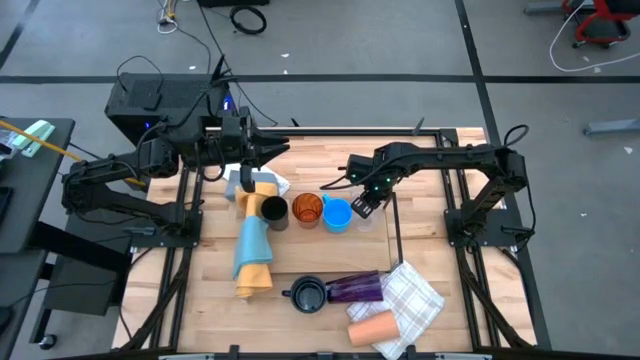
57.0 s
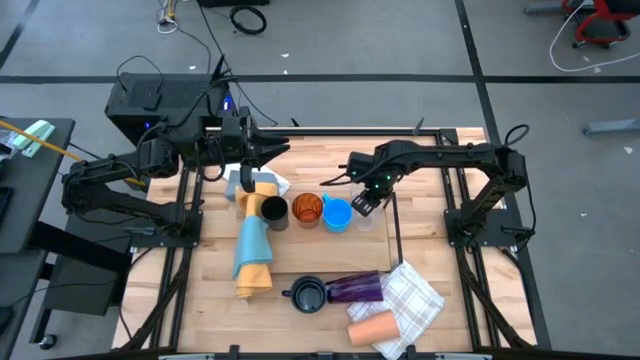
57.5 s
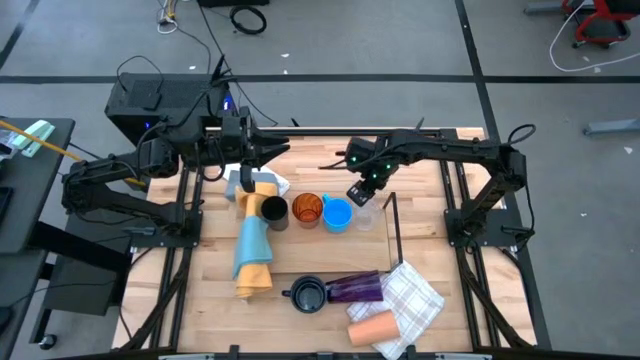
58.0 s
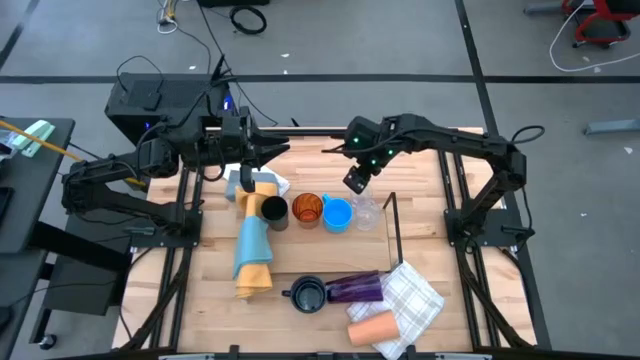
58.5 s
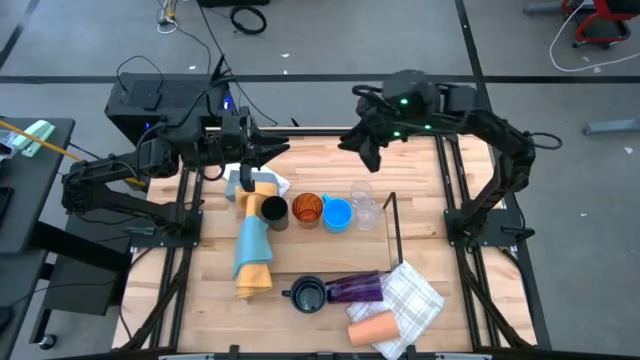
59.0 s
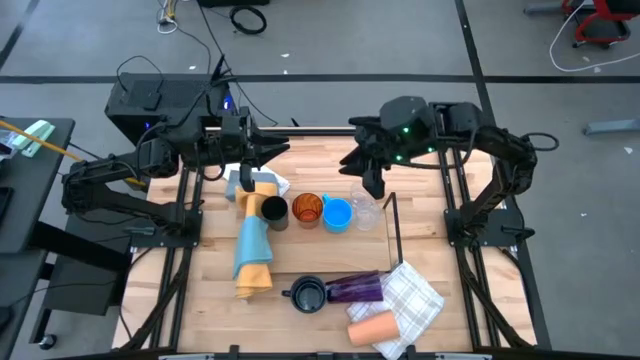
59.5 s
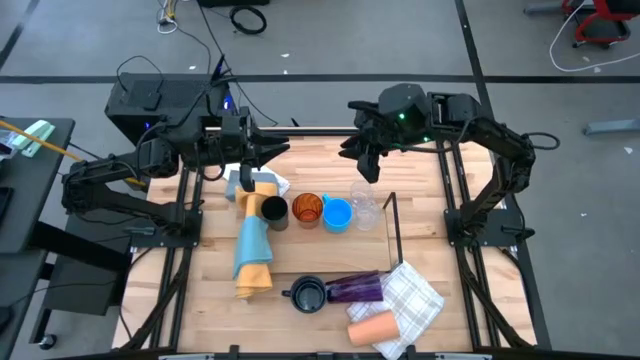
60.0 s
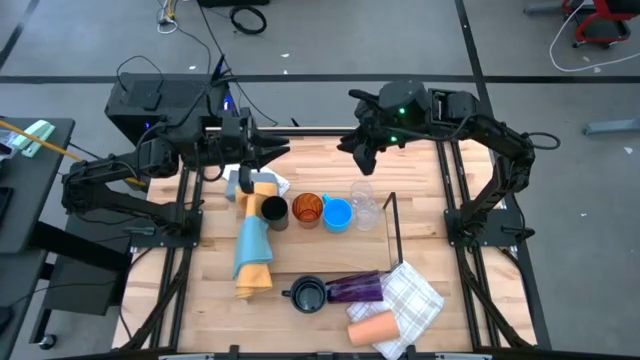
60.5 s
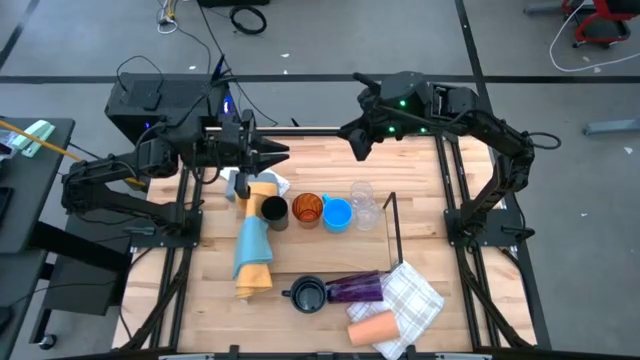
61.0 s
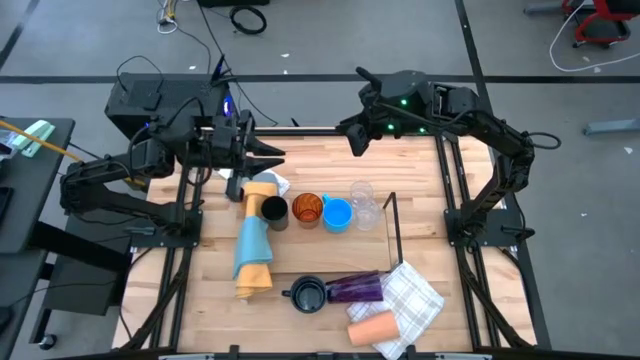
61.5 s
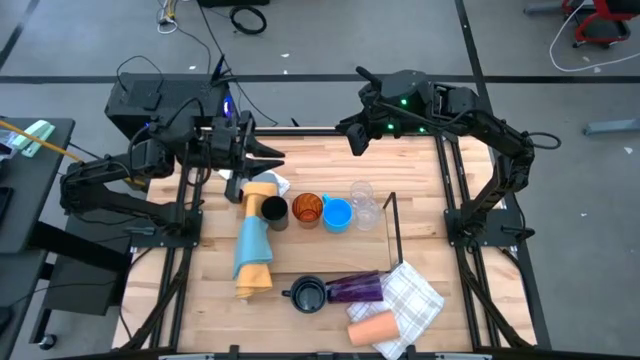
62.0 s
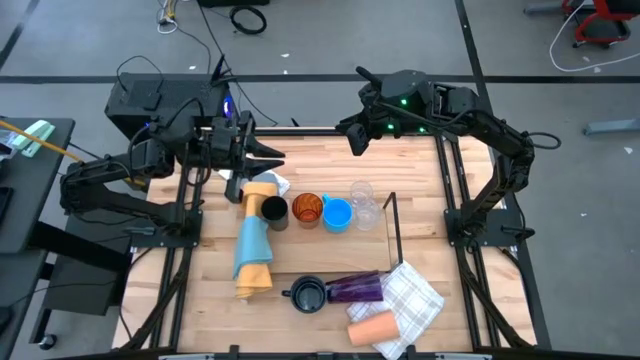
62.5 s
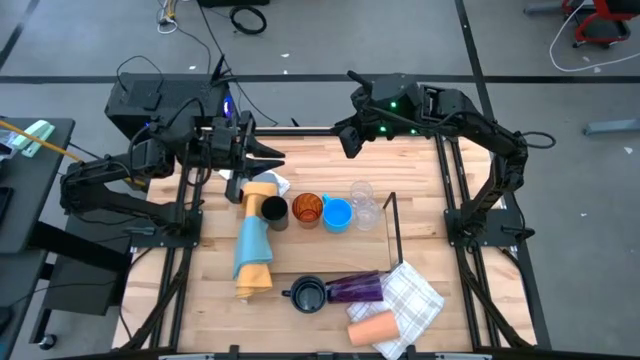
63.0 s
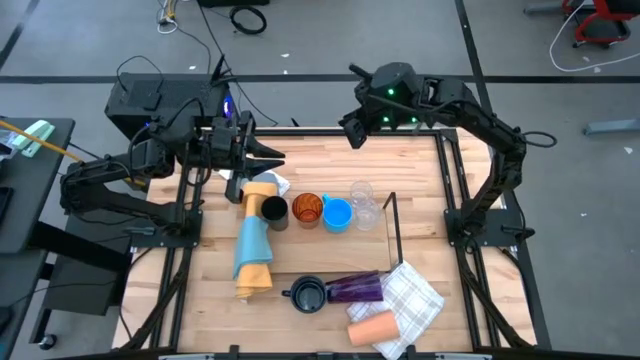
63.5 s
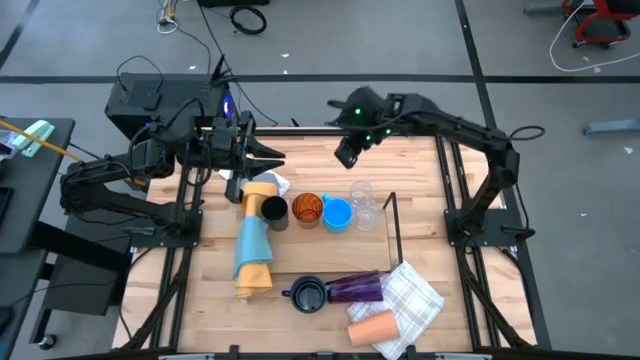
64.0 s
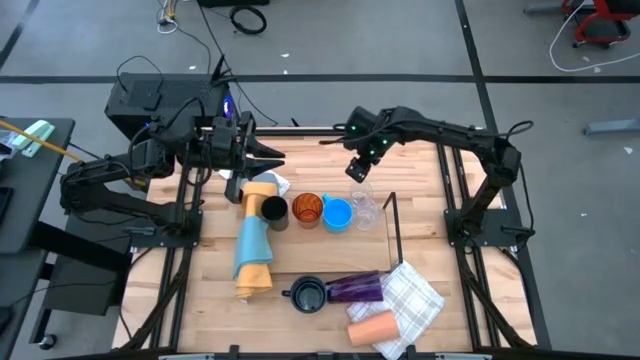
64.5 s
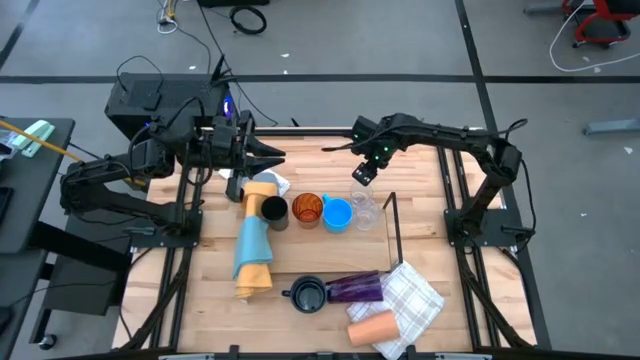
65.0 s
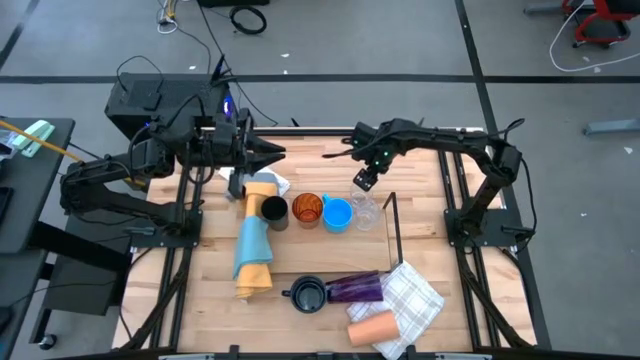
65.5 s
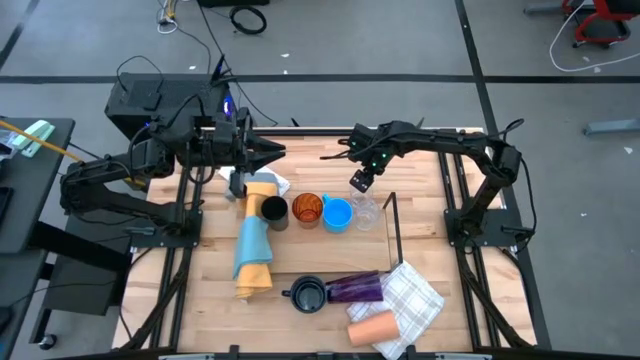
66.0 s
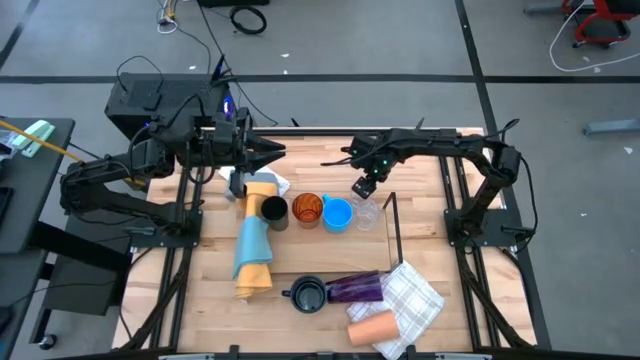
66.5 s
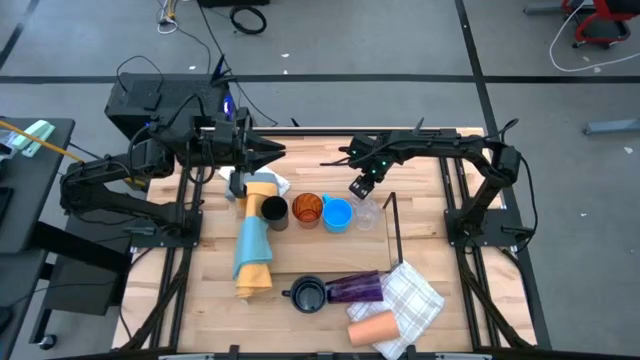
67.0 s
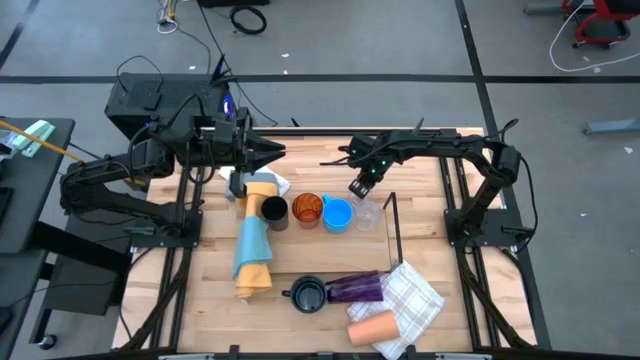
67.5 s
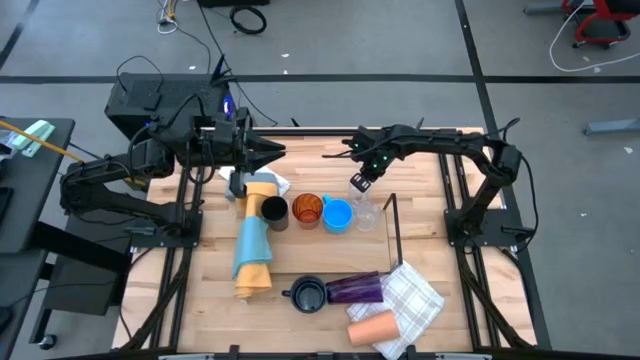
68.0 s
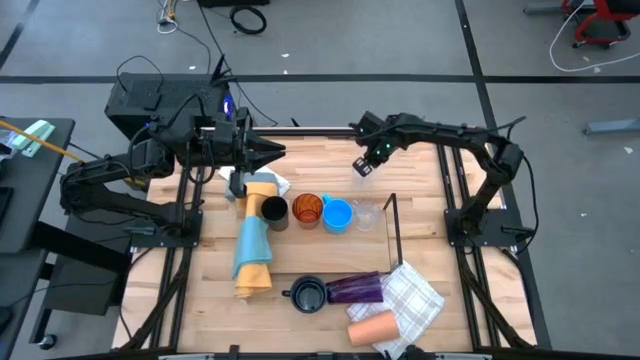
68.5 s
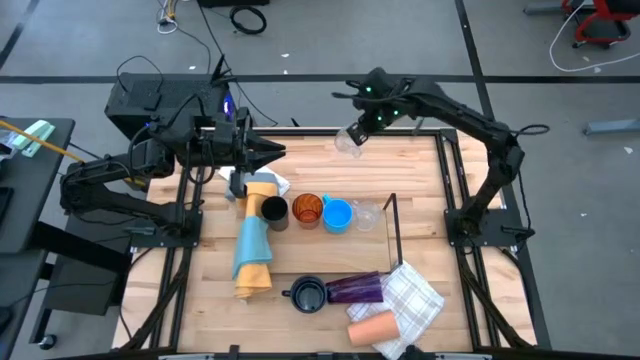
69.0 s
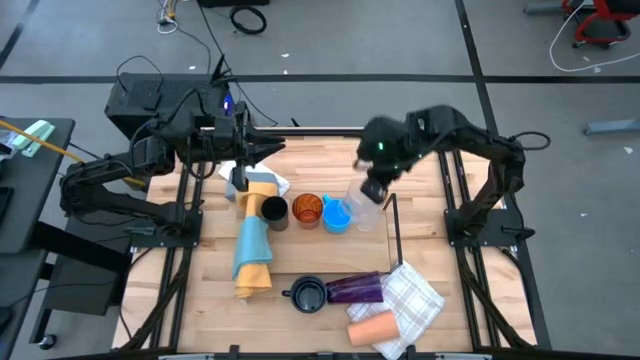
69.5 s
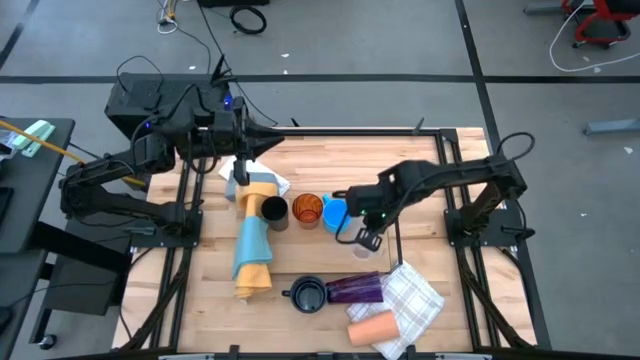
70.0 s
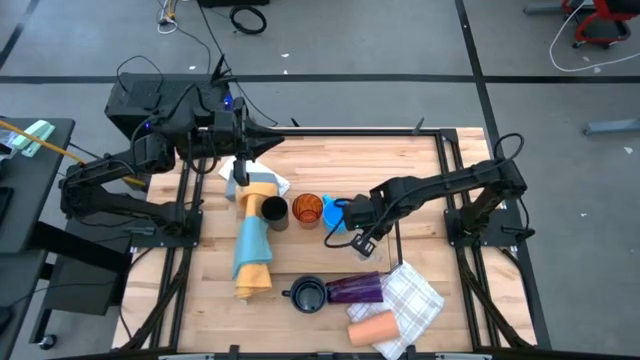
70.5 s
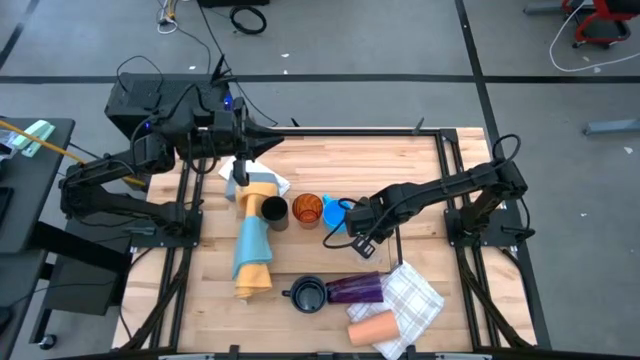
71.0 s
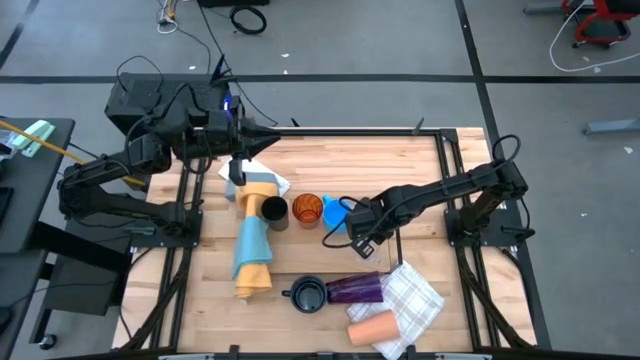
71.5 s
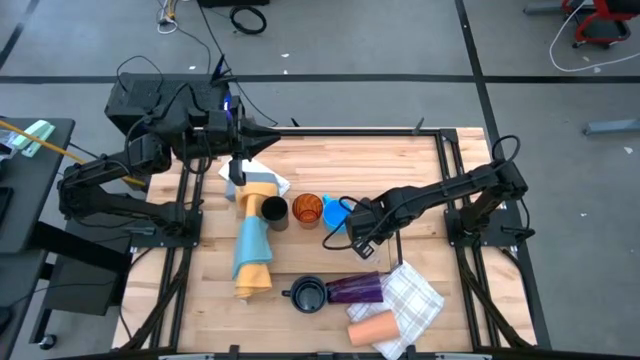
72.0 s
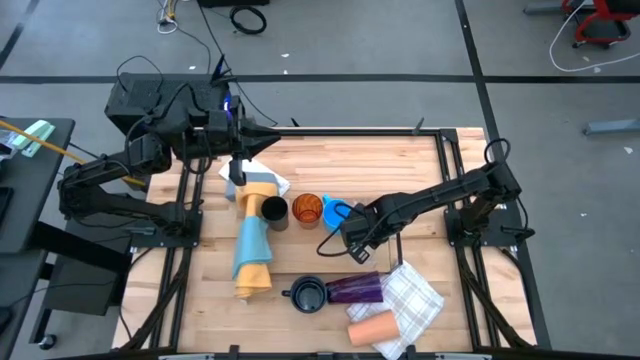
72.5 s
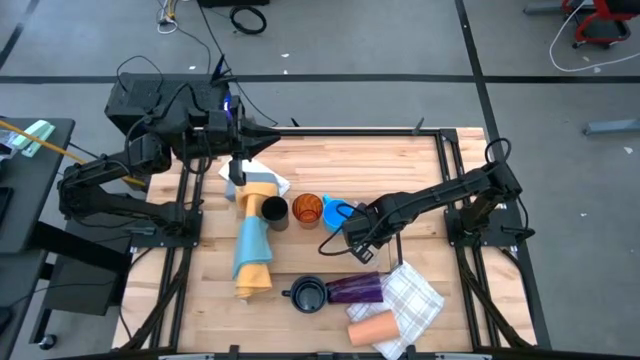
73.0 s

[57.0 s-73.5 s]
Task: Stack small to large cups/mugs on shelf
Put the transparent mug on the shelf

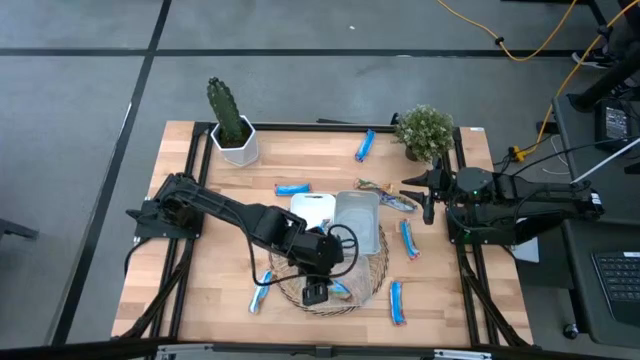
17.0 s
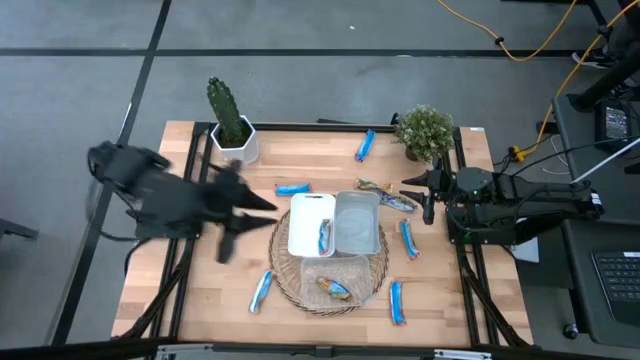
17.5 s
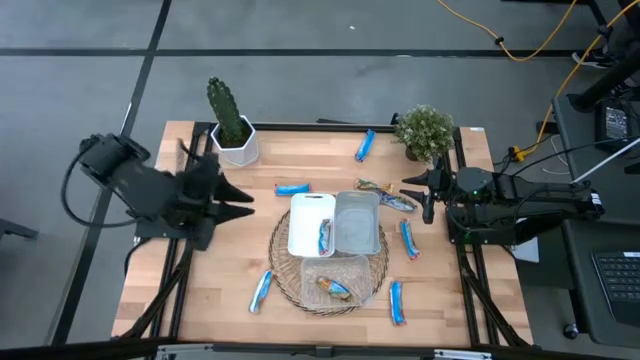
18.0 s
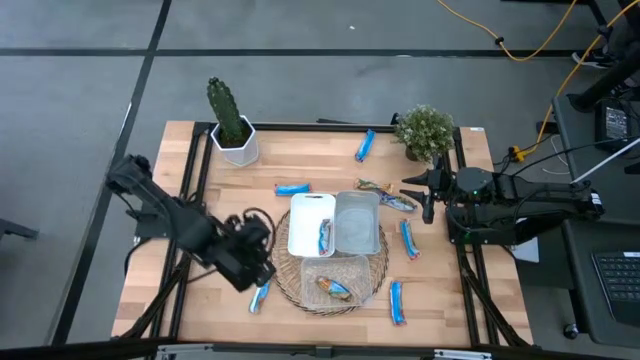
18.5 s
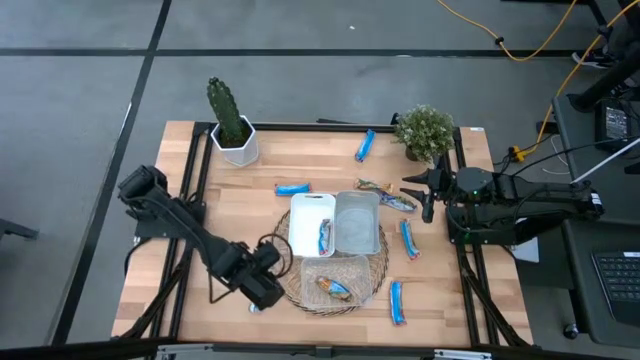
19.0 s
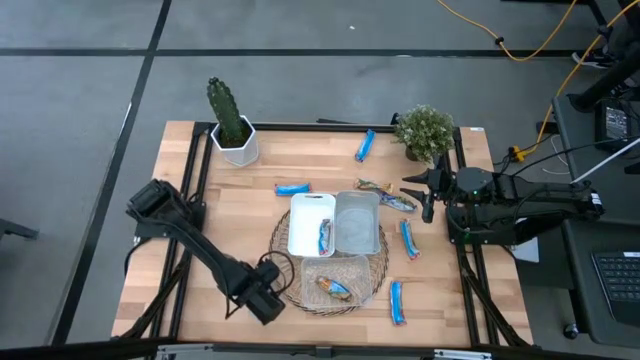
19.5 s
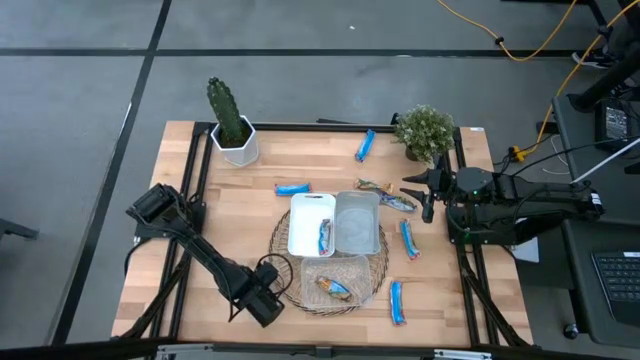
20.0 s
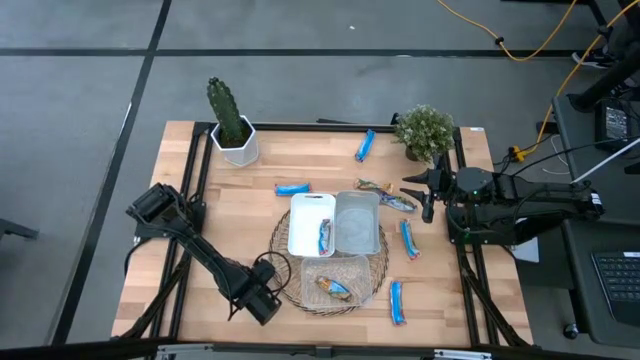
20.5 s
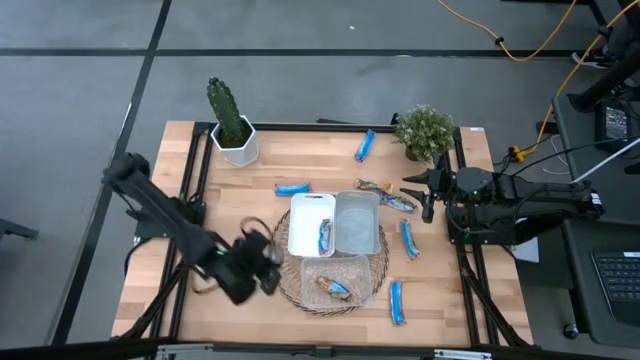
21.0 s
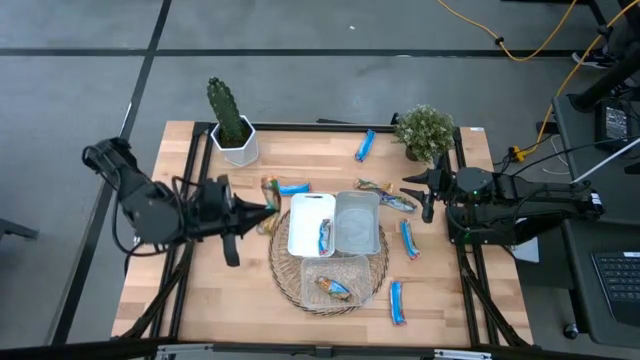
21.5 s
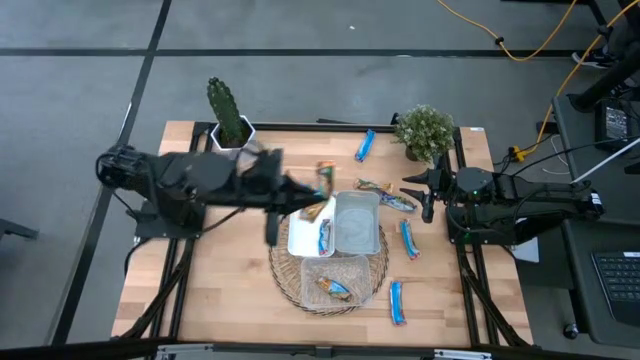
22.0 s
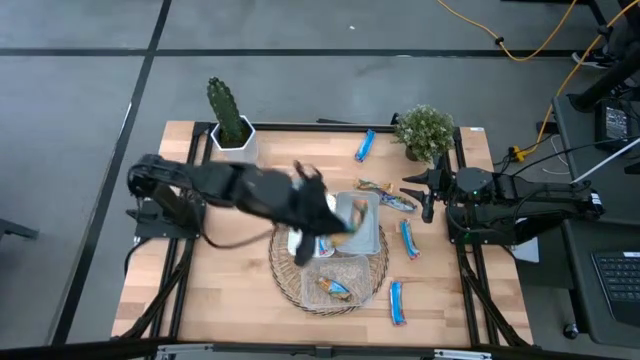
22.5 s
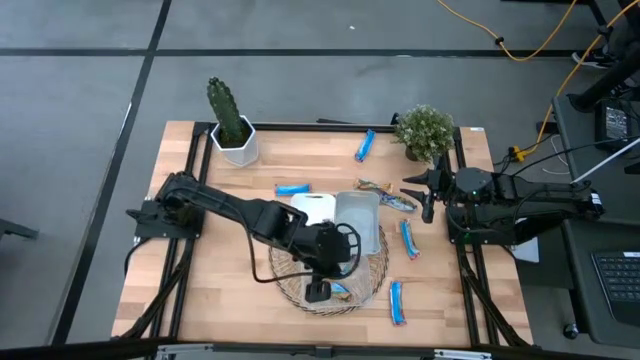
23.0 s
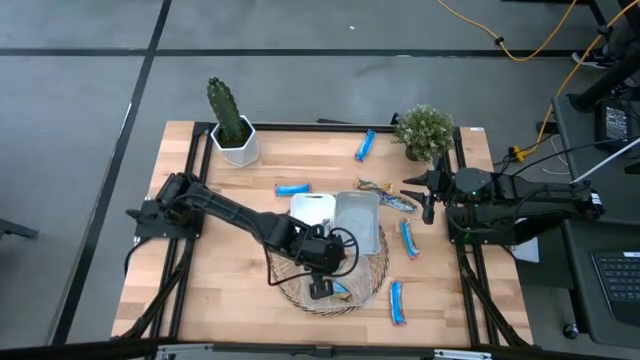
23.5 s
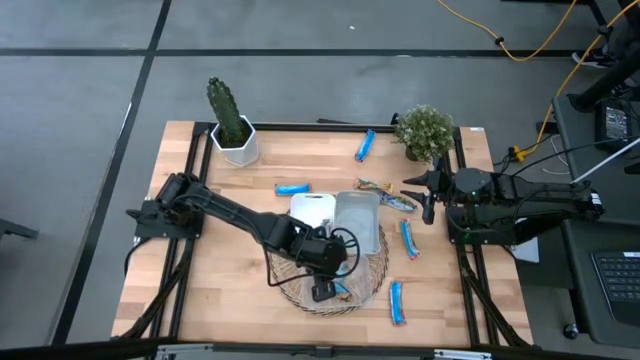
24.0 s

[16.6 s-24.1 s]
Task: Pick and place Granola Bars by type
Put the orange granola bar into the transparent bin
